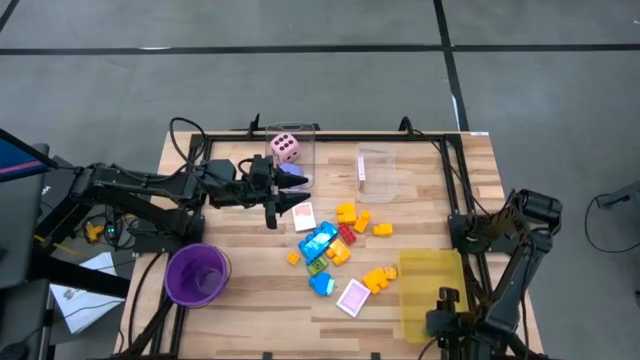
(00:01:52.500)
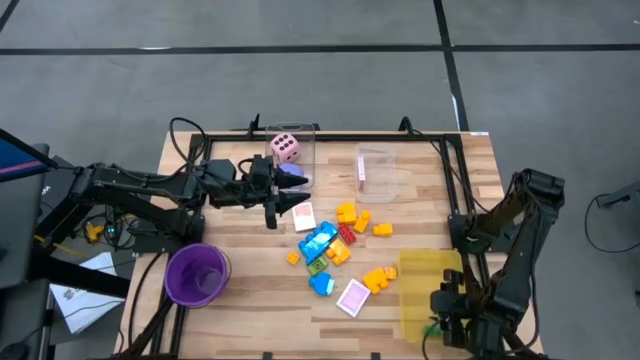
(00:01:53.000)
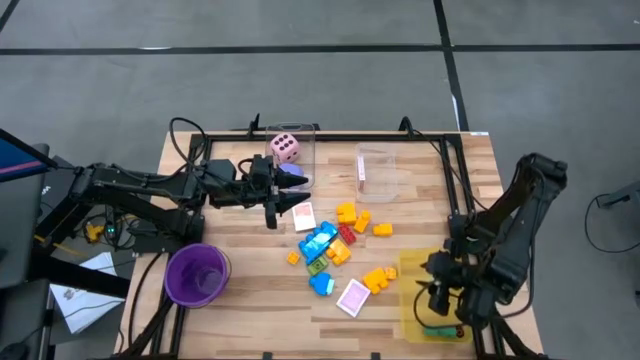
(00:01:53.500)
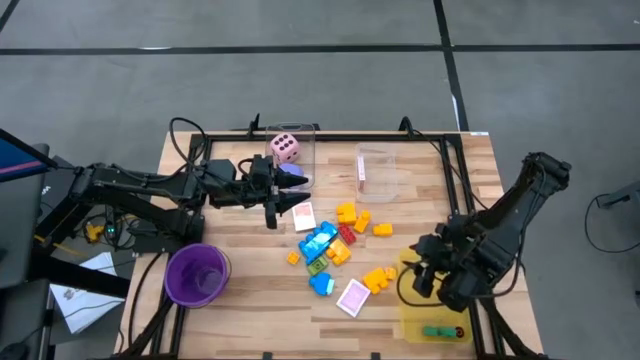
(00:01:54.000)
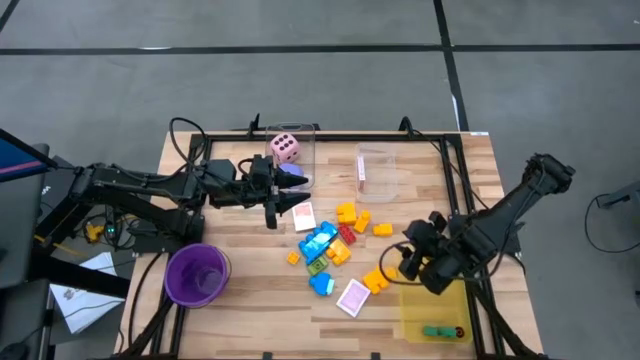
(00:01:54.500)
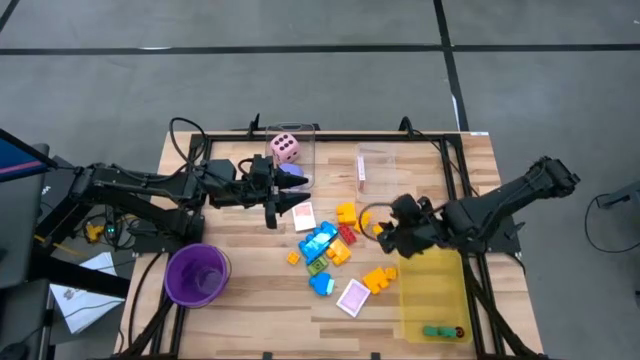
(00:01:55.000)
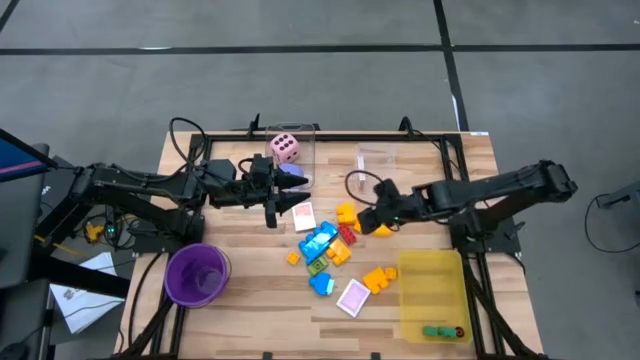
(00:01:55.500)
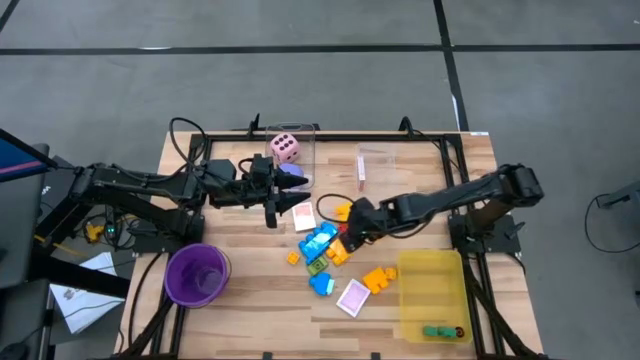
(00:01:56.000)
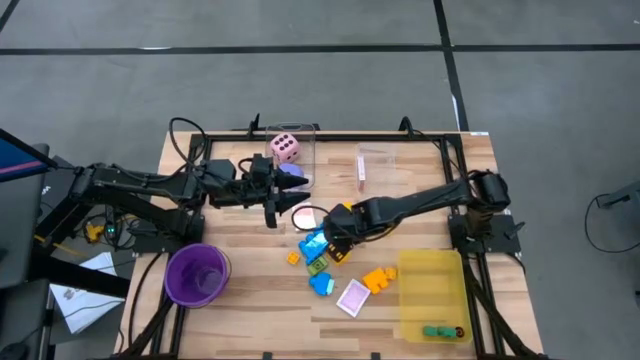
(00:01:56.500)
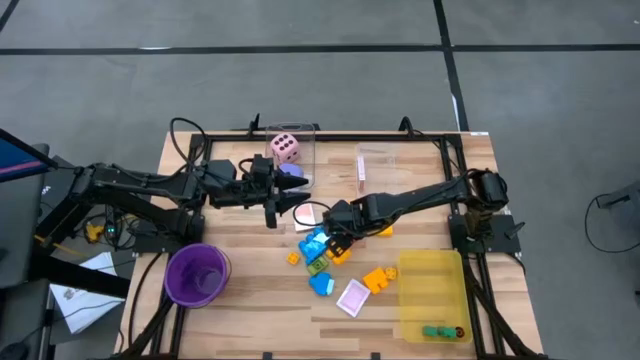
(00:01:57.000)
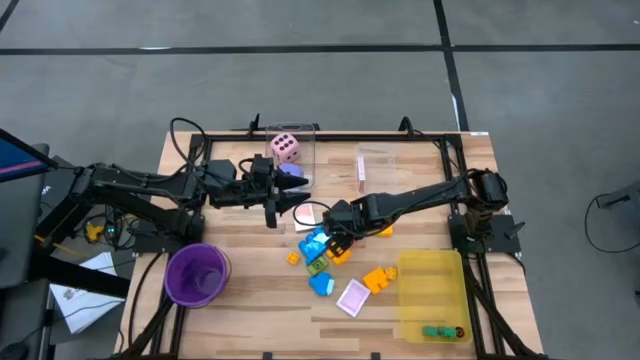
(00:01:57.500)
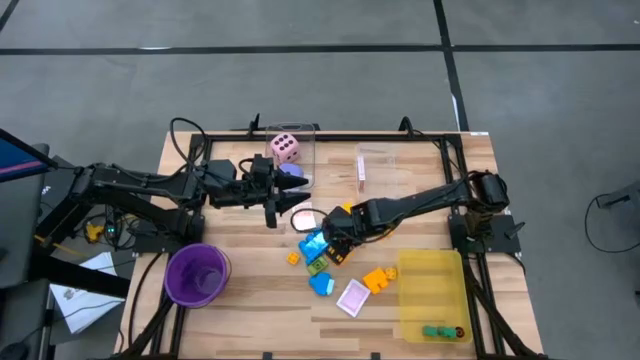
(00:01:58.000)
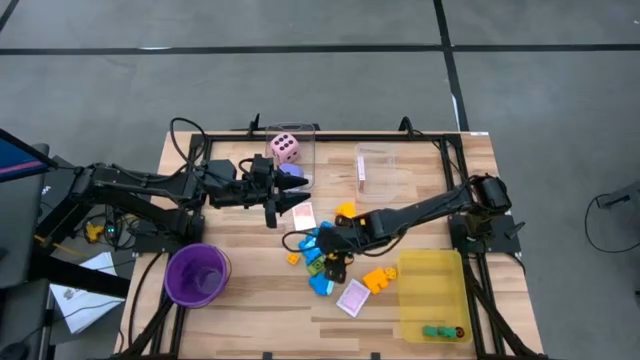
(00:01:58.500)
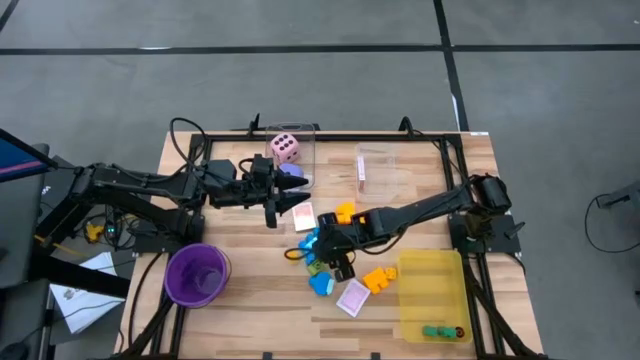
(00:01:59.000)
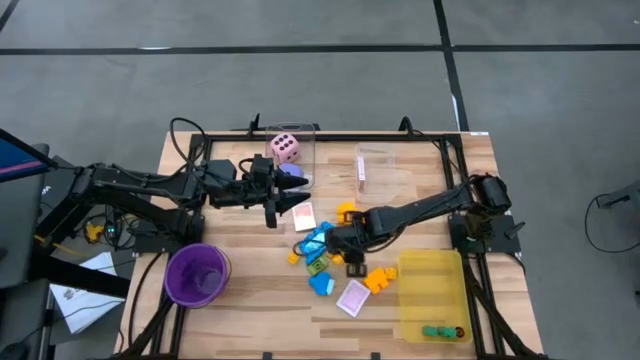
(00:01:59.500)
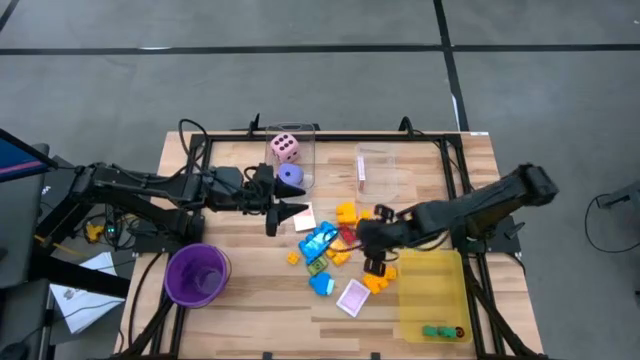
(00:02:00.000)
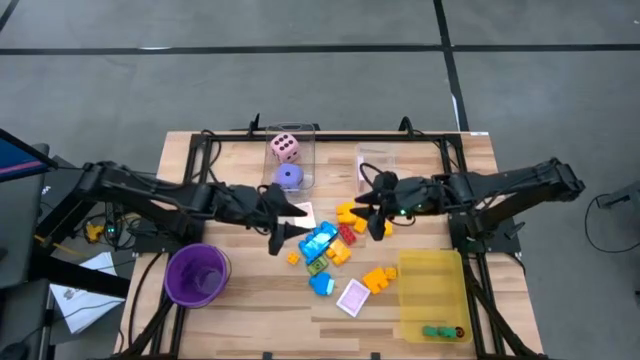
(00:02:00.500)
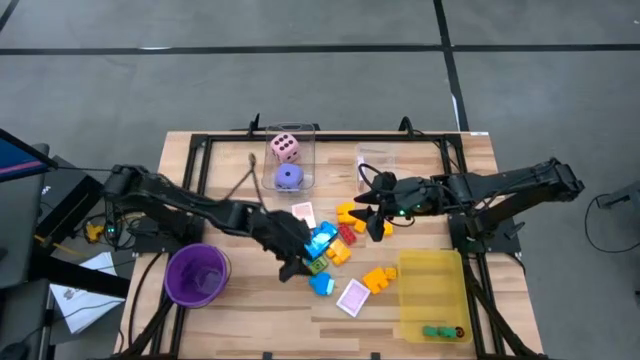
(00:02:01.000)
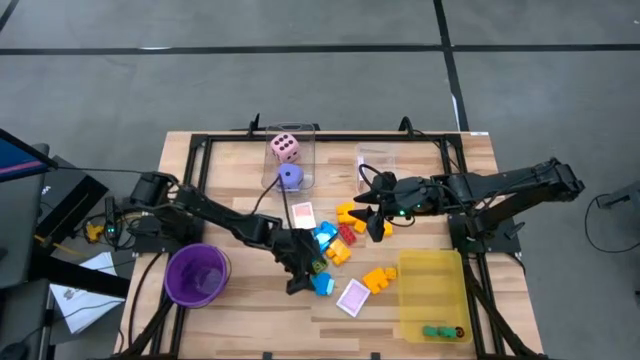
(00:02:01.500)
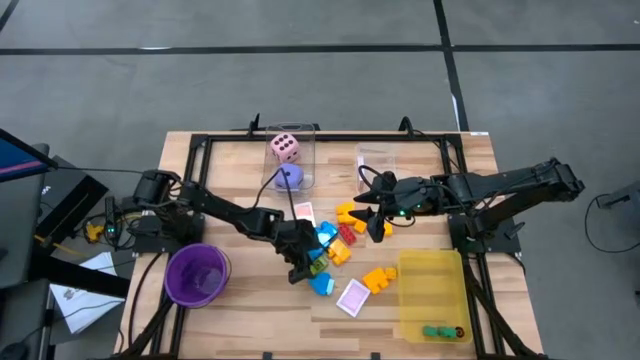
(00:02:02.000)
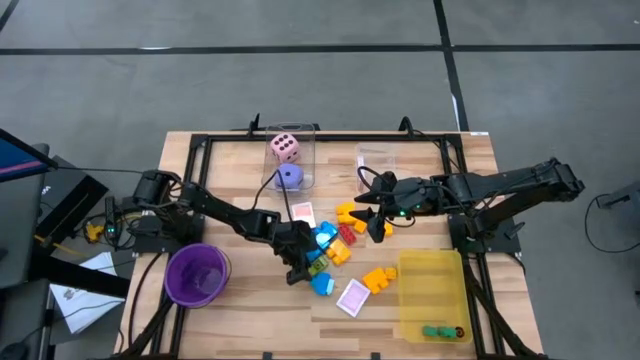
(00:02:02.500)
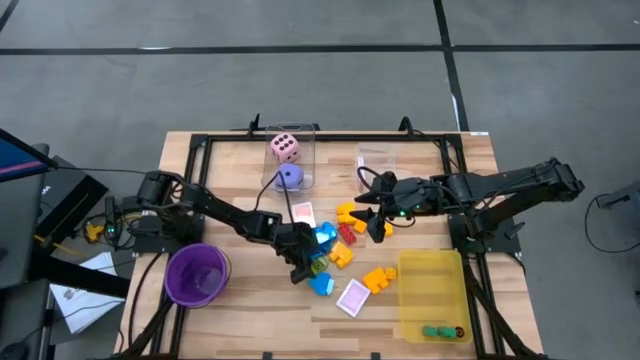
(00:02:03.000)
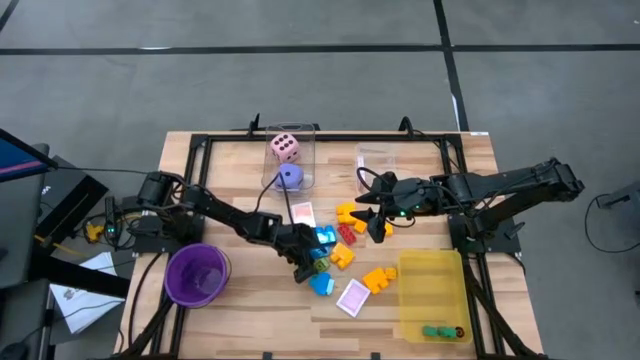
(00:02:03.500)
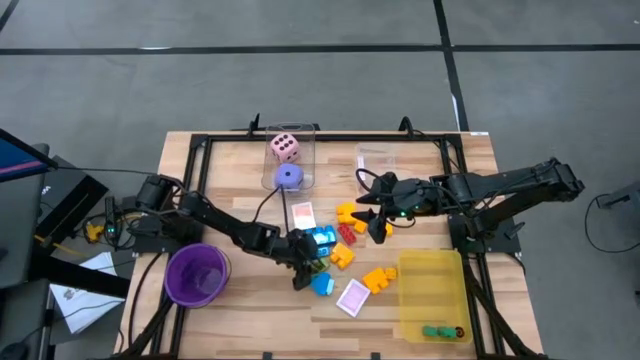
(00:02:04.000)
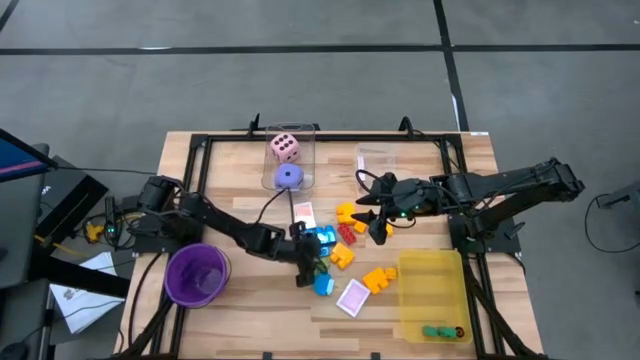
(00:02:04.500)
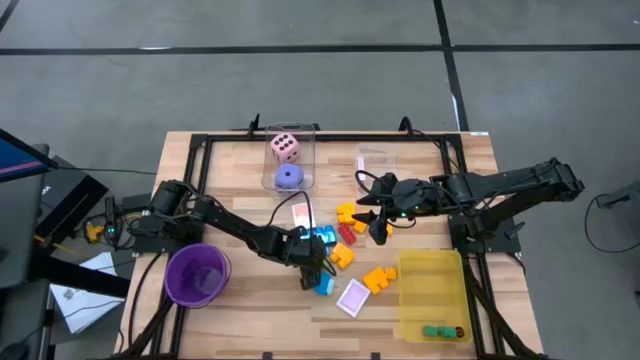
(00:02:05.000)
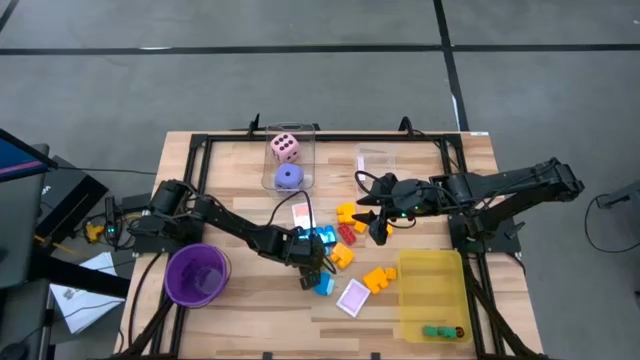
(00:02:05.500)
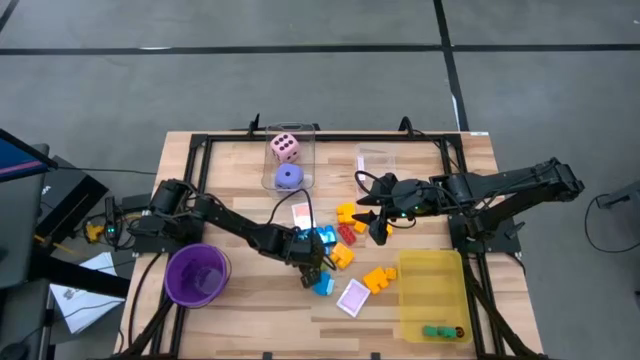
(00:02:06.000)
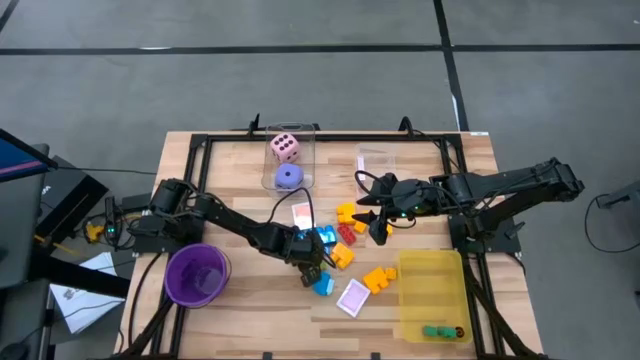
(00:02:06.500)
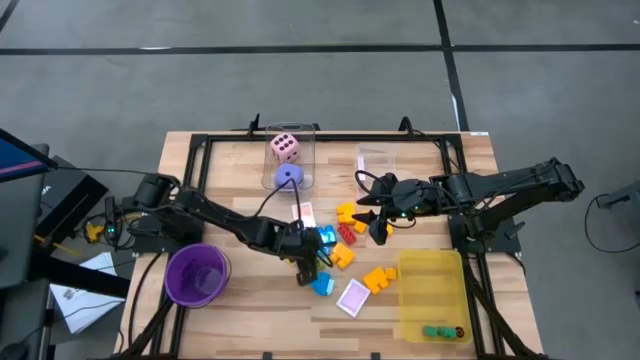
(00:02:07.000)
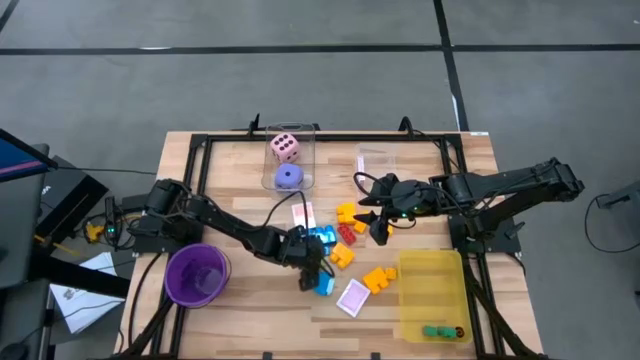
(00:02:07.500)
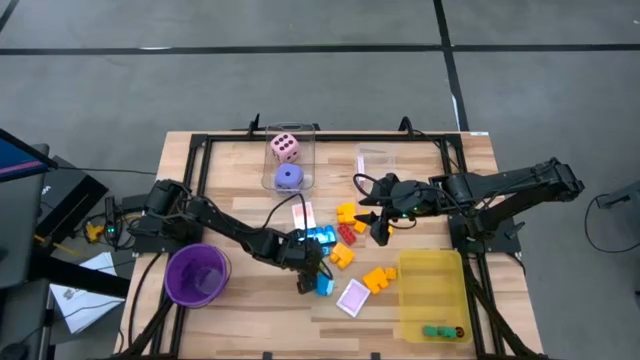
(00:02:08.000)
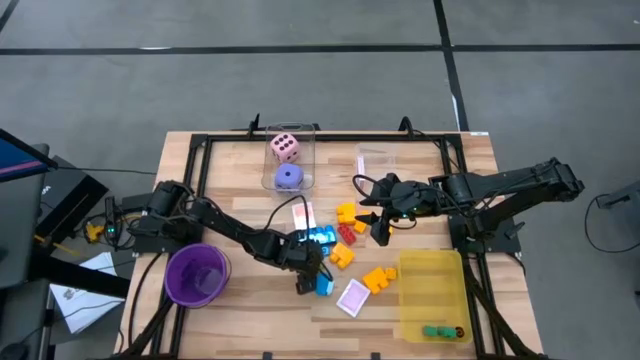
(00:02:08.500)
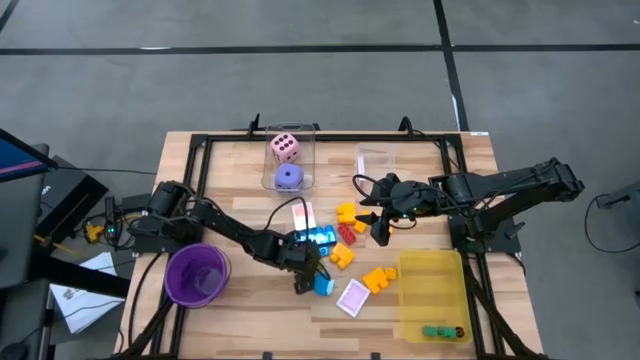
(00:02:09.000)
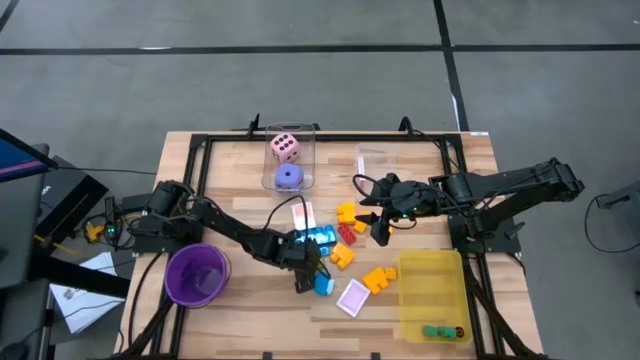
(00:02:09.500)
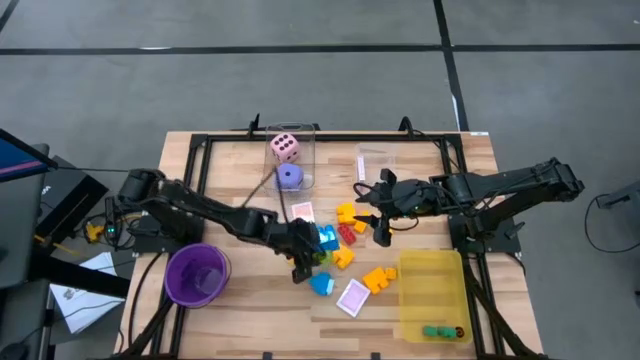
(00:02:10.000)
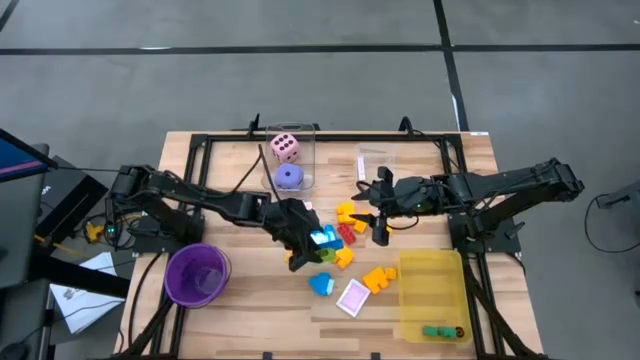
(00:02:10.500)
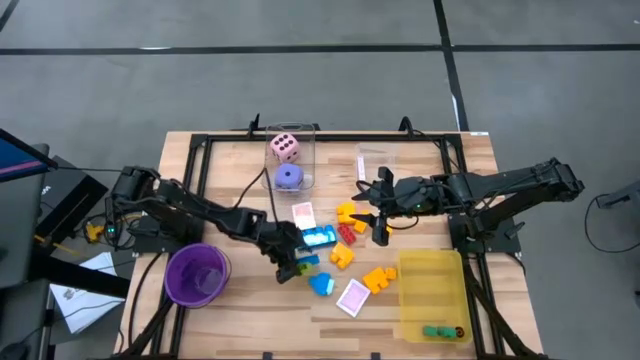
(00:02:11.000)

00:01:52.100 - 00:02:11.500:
Task: Pick & Place Toys
Put the light green game piece into the bin

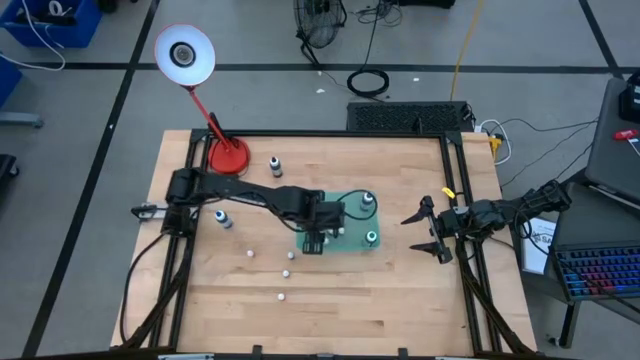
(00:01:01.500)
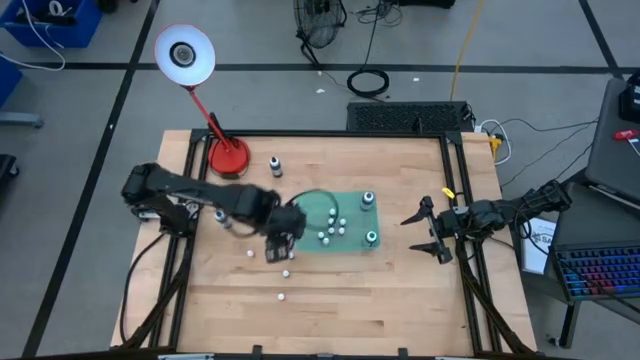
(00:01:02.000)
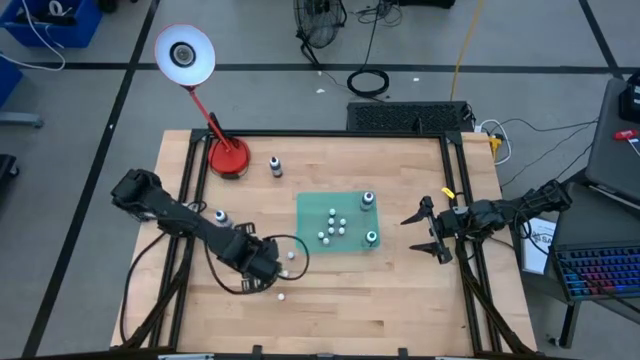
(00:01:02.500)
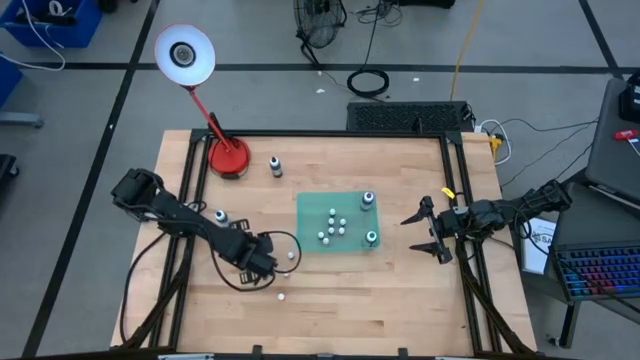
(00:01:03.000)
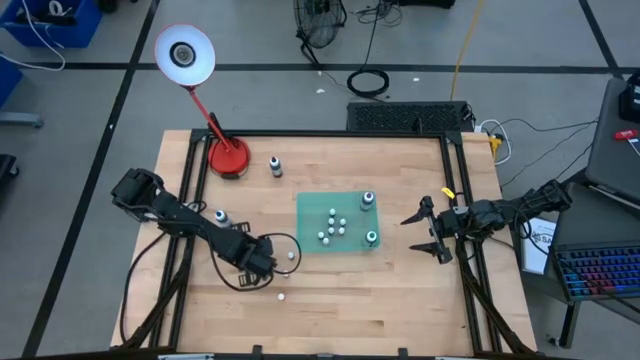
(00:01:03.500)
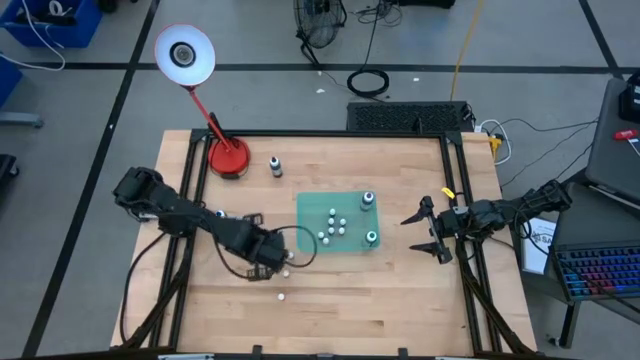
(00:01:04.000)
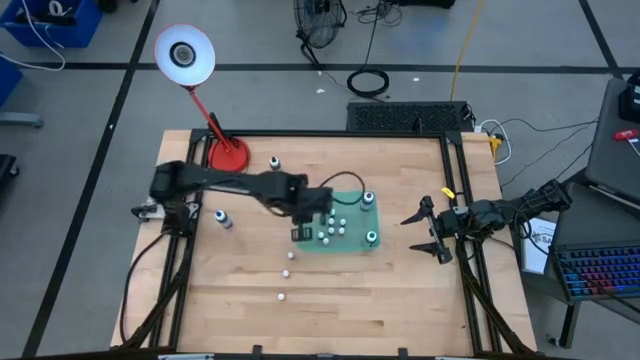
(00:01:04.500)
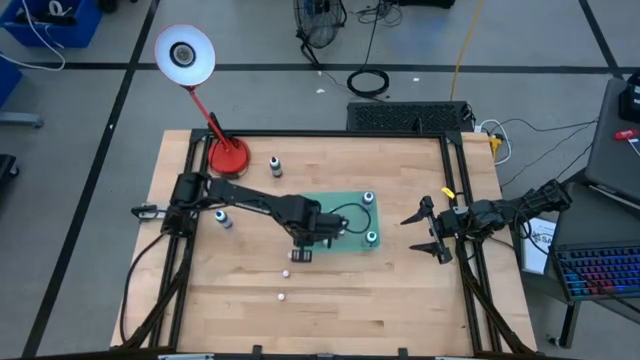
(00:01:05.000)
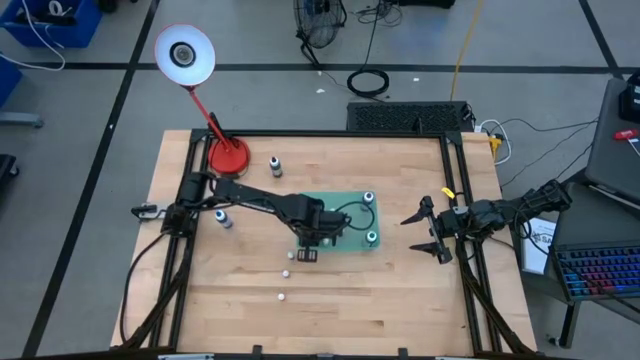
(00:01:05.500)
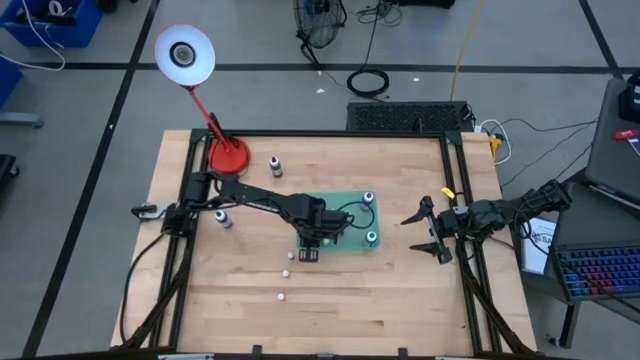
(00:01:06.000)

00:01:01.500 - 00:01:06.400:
Task: Pick & Place food coloring
Put the small orange food coloring bottle into the blue bin
